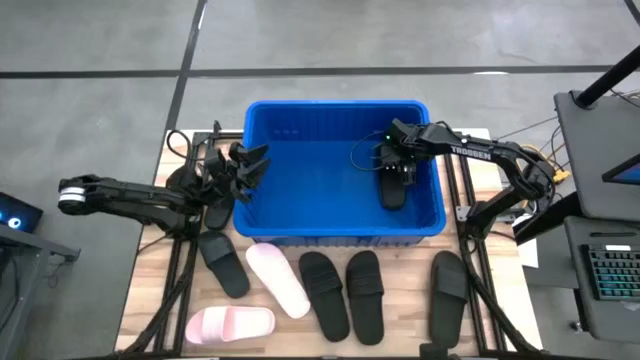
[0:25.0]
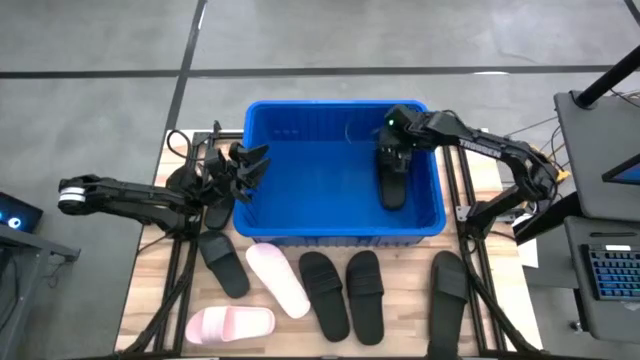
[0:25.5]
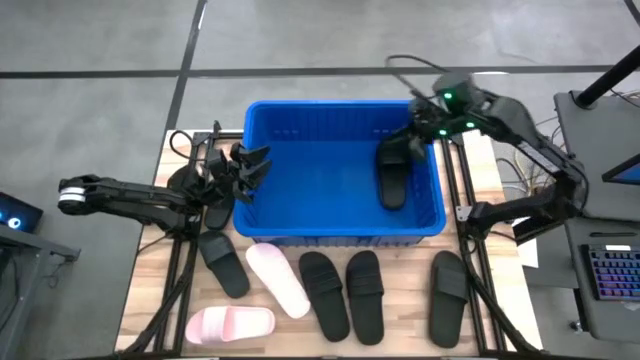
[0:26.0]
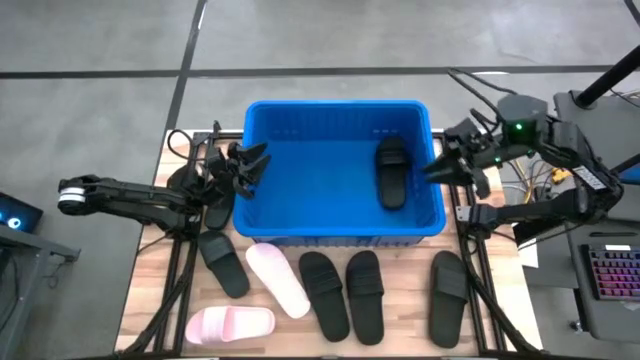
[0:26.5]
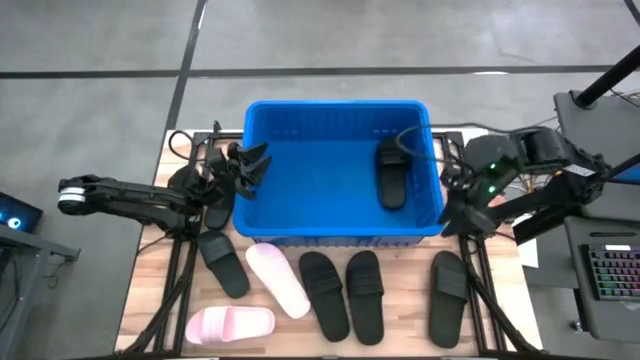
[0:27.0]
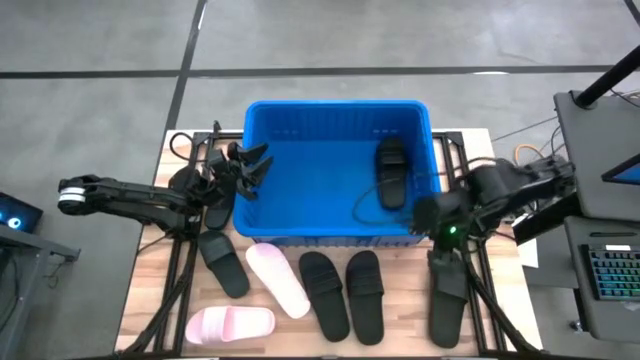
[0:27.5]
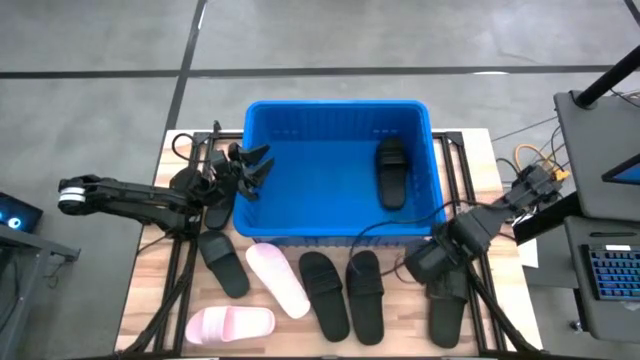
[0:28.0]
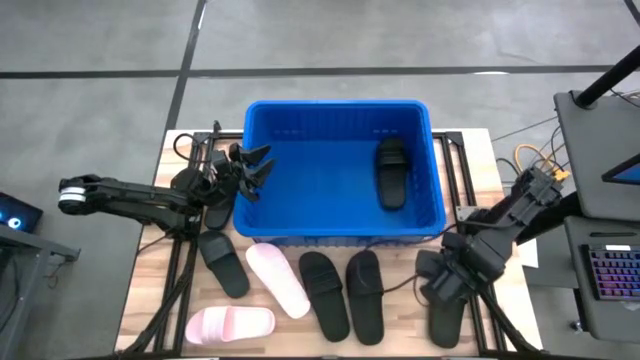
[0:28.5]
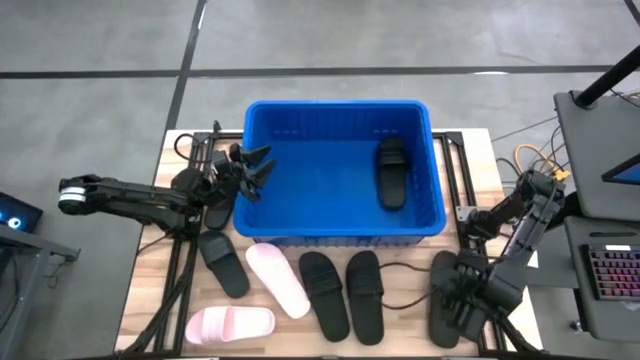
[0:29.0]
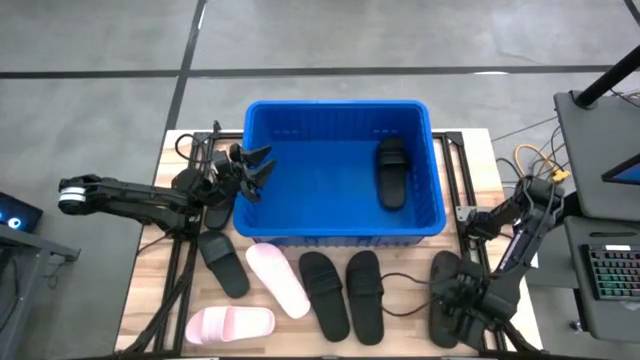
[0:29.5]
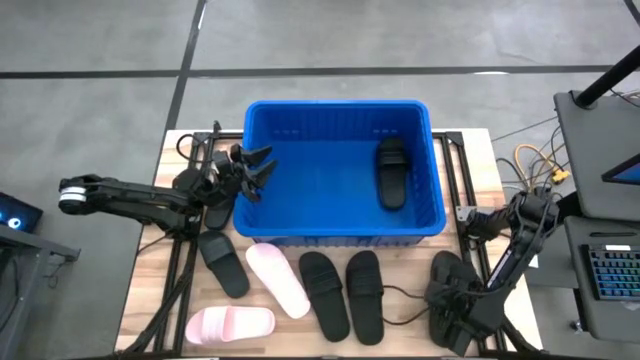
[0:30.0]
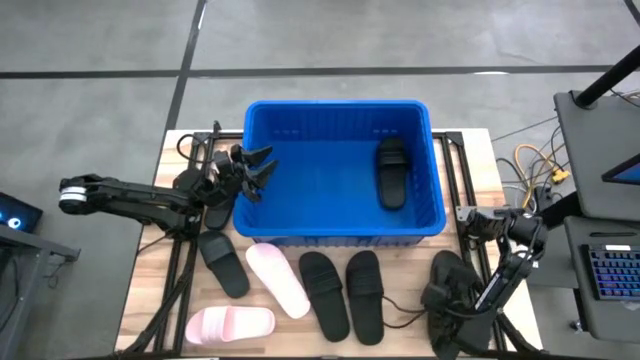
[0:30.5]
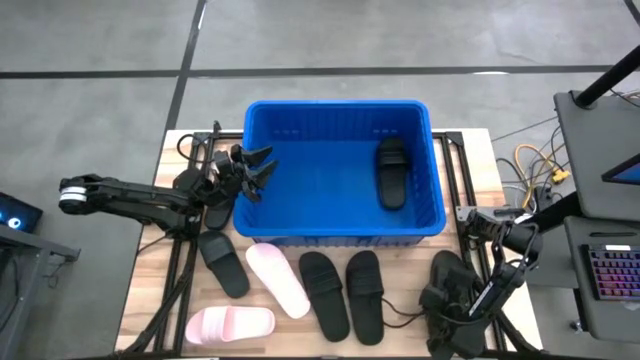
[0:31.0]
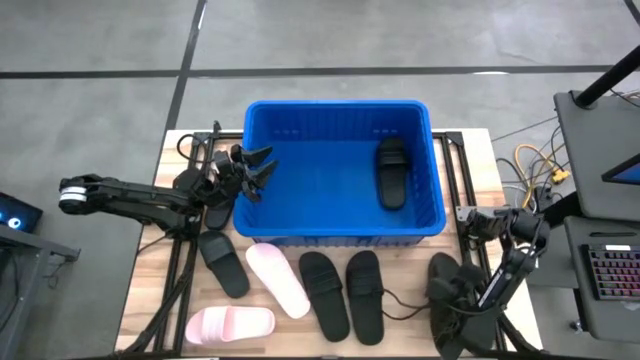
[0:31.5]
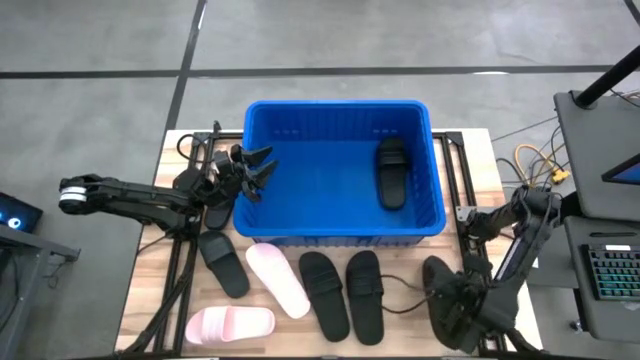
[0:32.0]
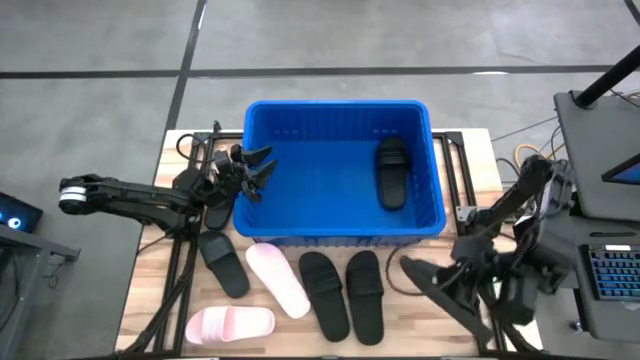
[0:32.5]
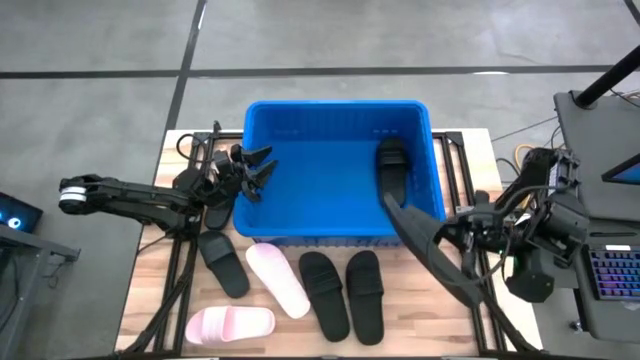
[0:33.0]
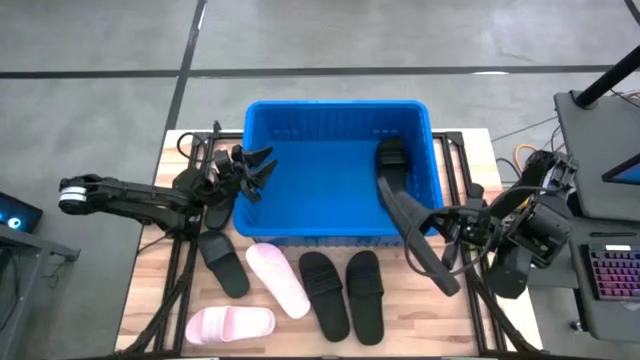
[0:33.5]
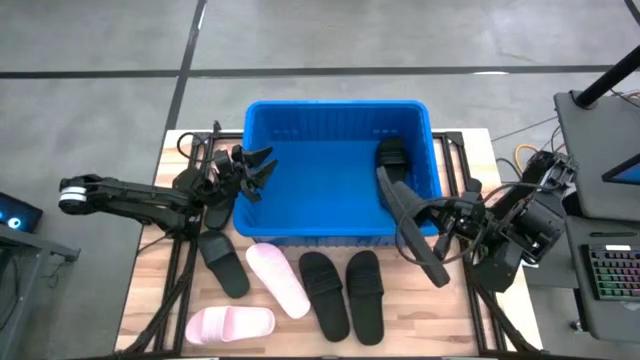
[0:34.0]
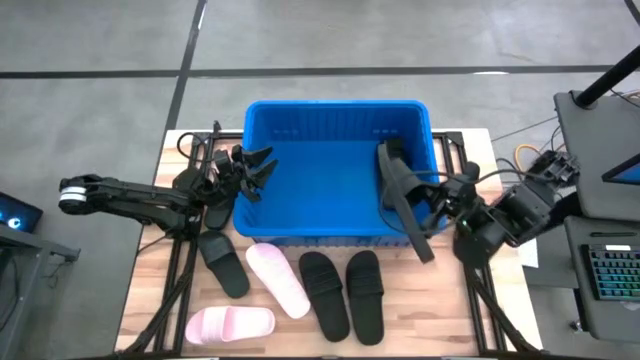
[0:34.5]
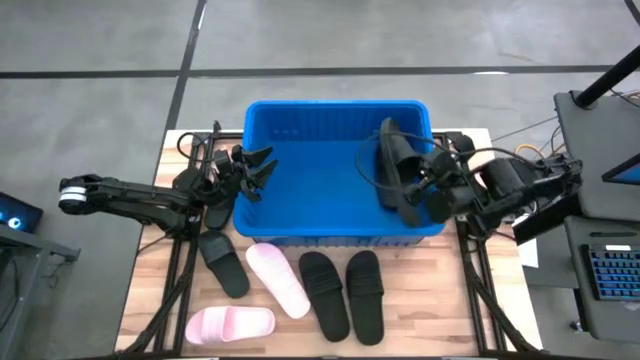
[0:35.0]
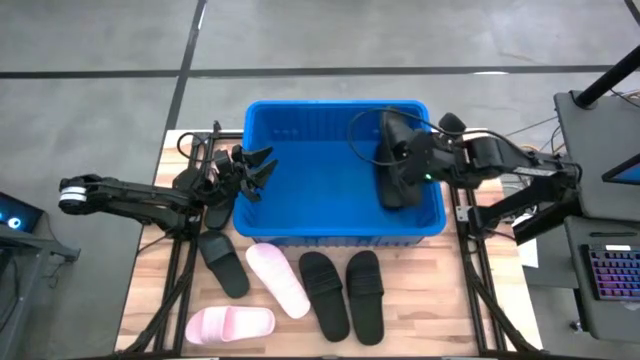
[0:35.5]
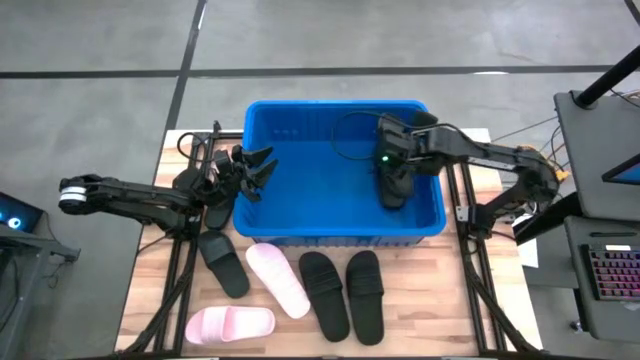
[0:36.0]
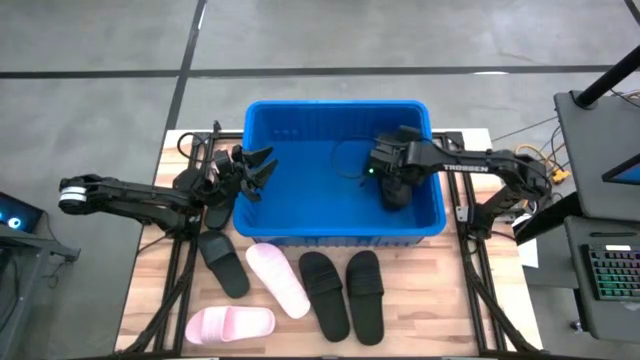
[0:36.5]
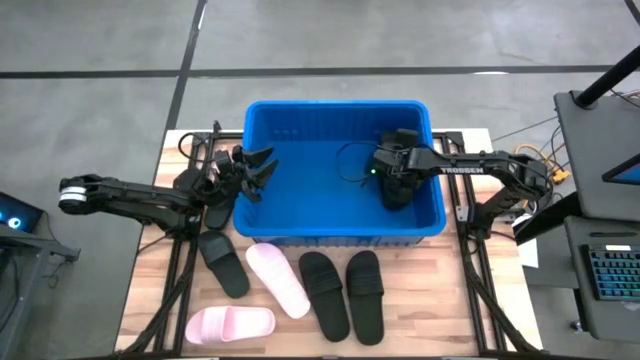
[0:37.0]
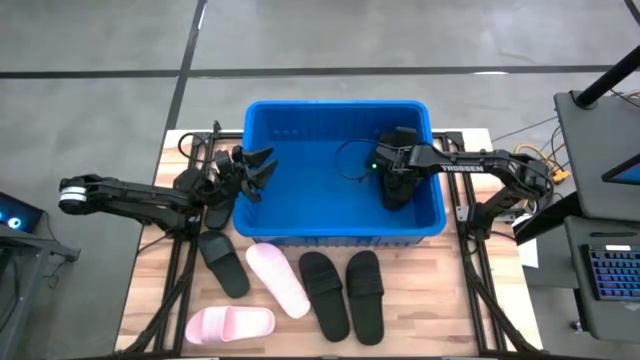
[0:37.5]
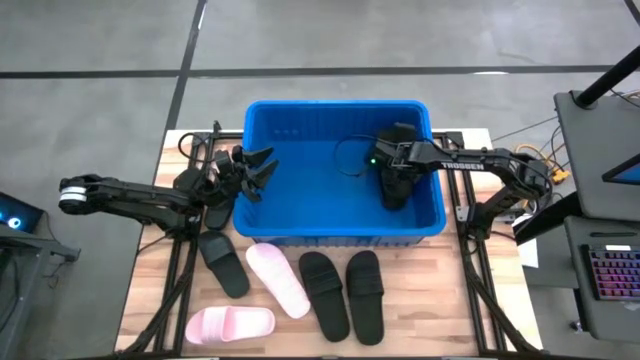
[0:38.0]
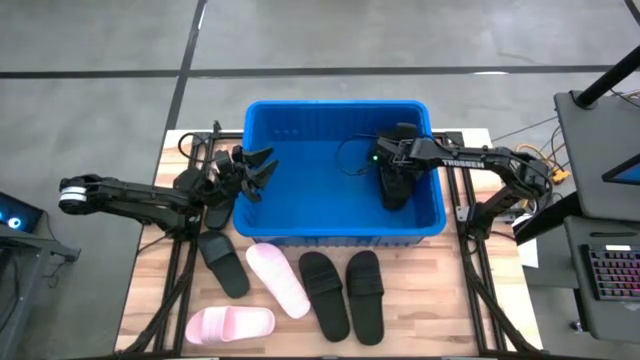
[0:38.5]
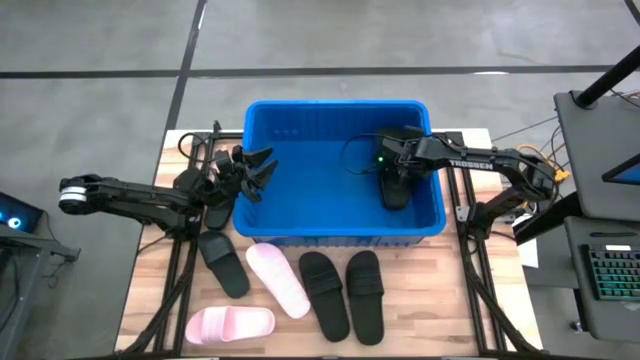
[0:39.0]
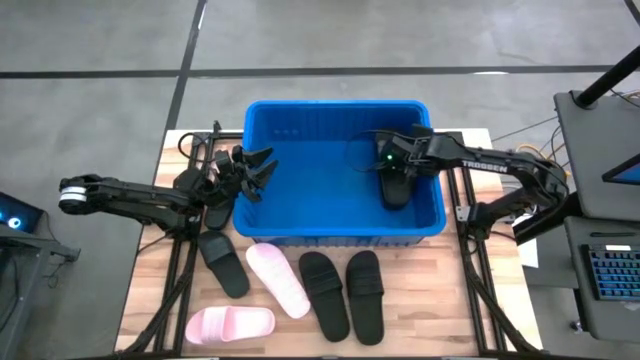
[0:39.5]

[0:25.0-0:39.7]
Task: Pick and place slides into bin
Put the black slide into the blue bin

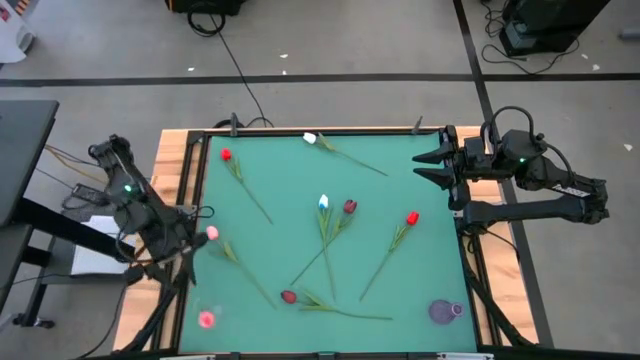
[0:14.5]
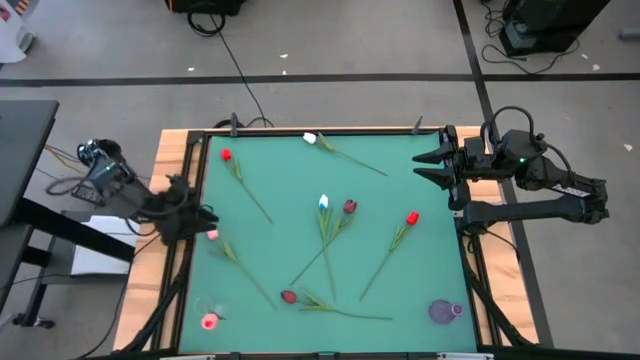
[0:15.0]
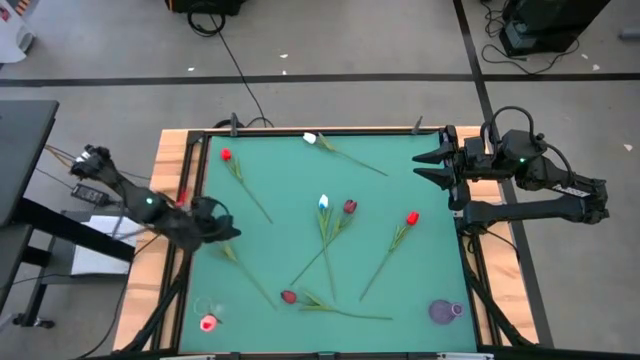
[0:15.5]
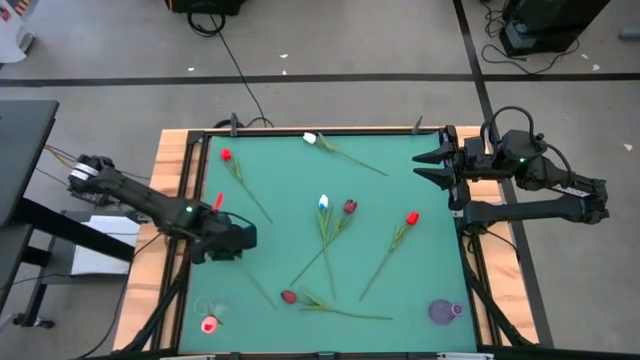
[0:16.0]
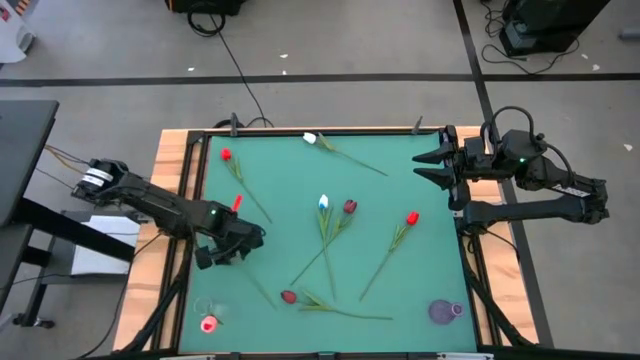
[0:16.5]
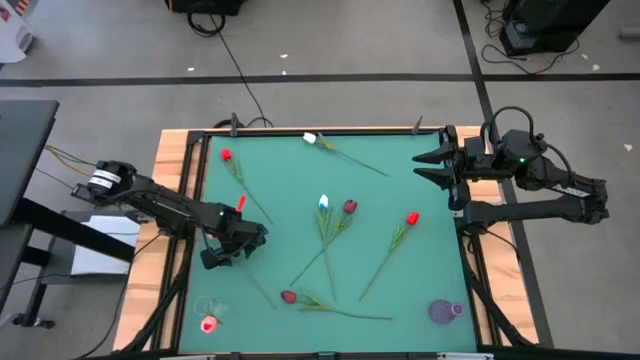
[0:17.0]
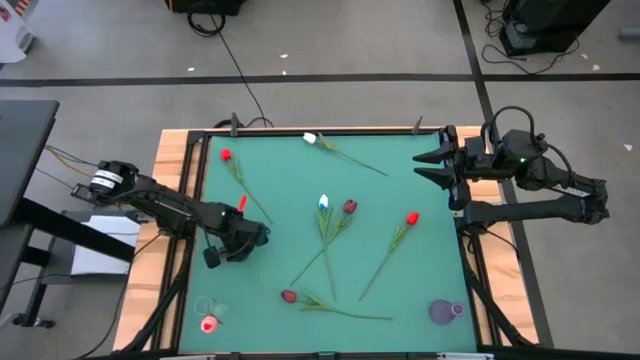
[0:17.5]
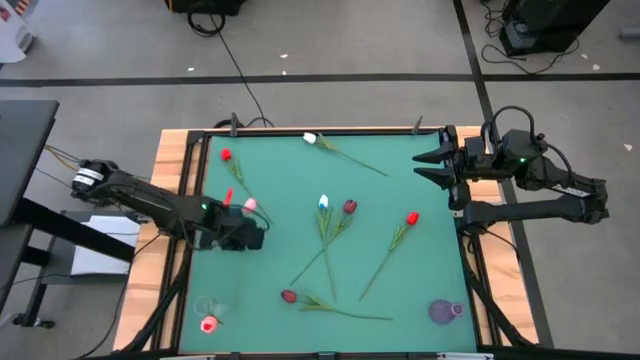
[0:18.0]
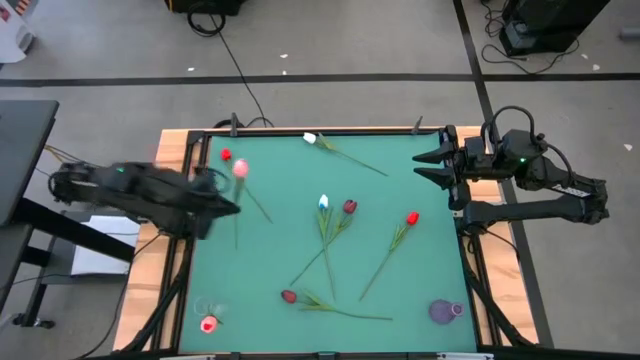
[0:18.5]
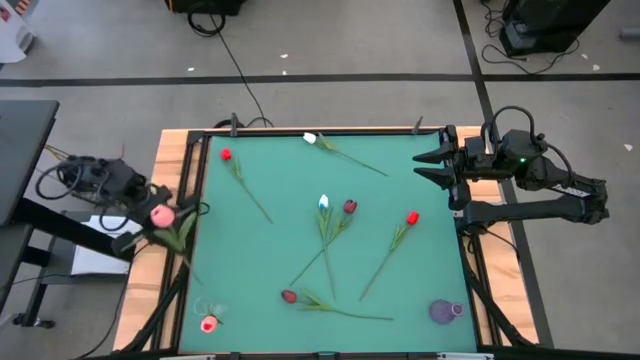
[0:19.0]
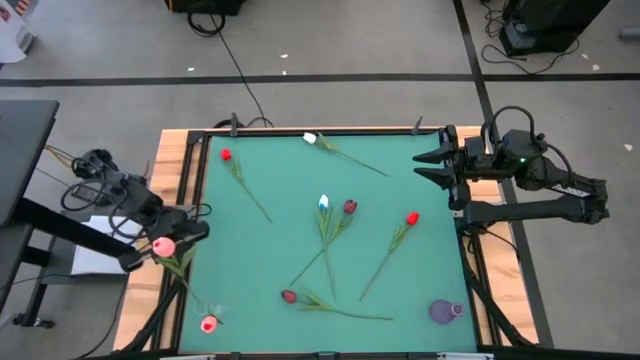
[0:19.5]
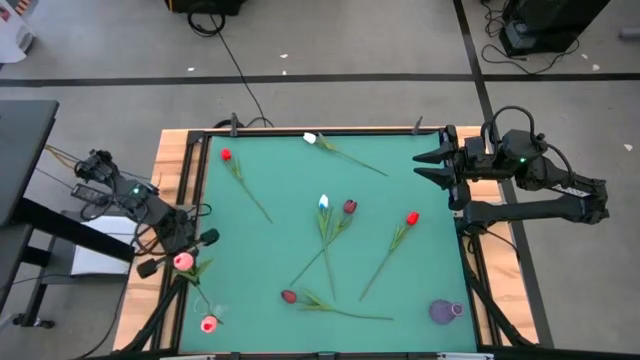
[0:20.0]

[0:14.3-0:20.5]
Task: Sort flowers into vase by color
Put the pink flower into the transparent vase
